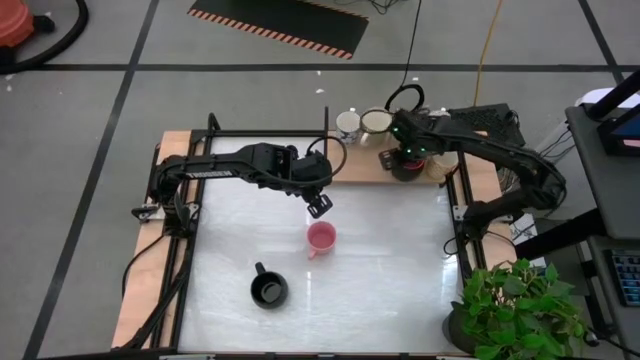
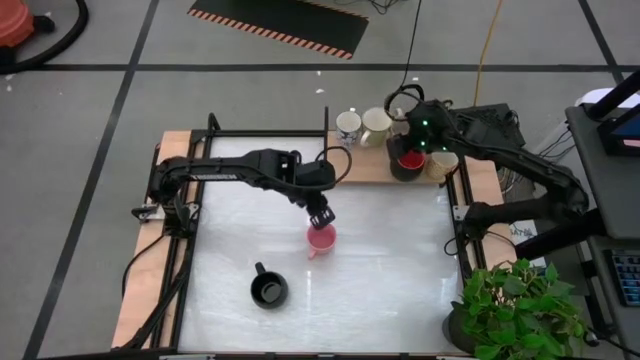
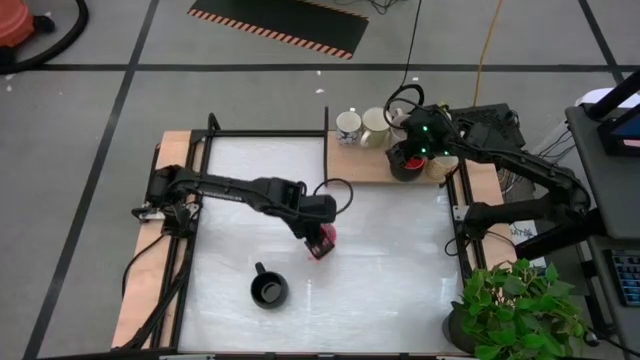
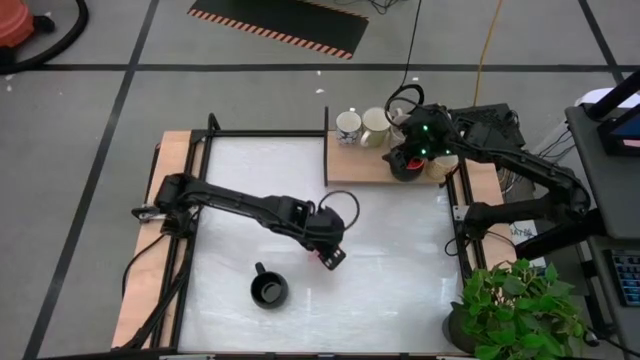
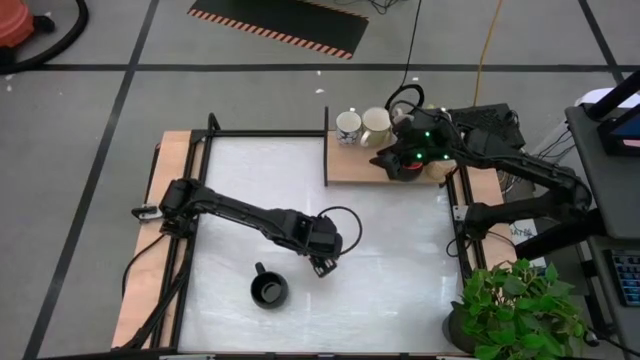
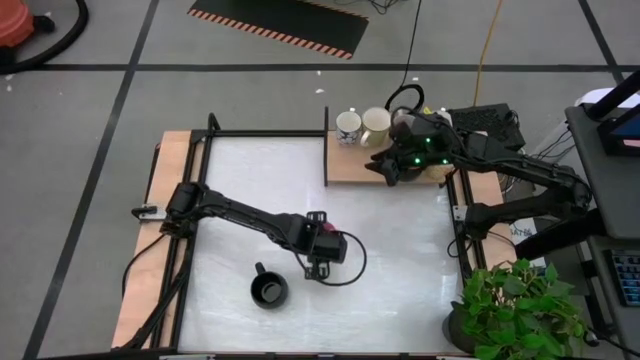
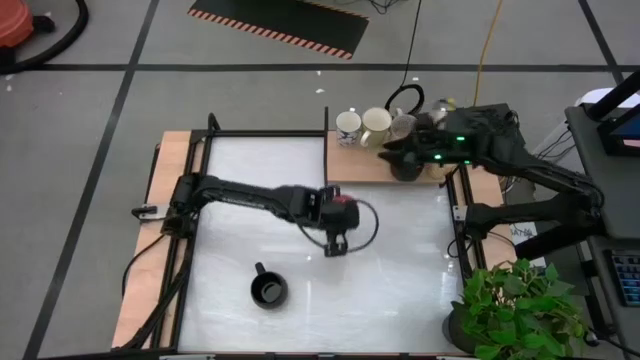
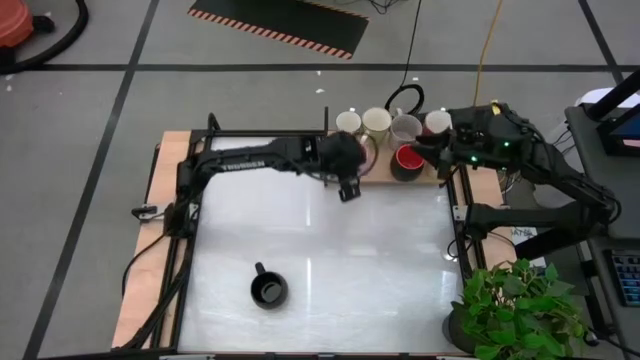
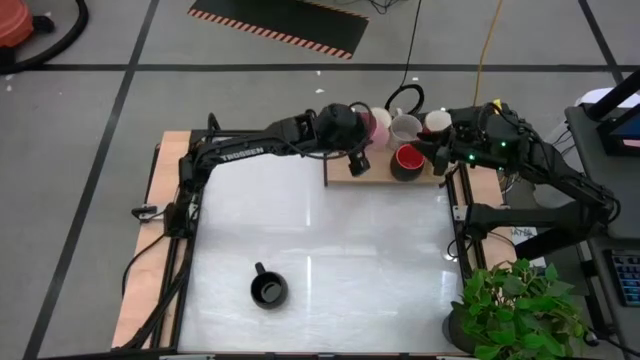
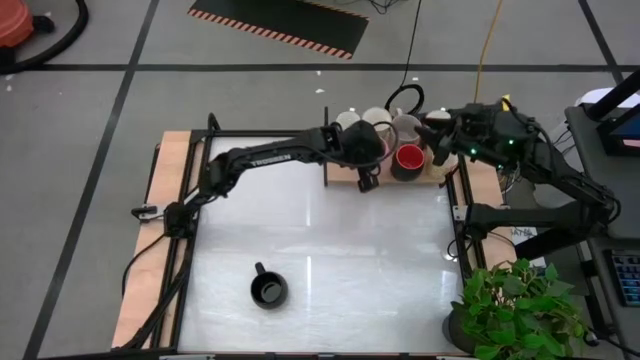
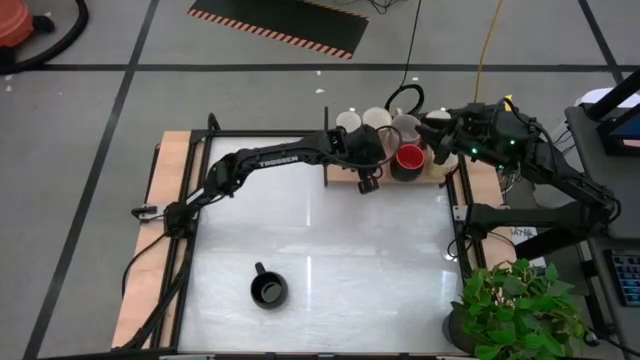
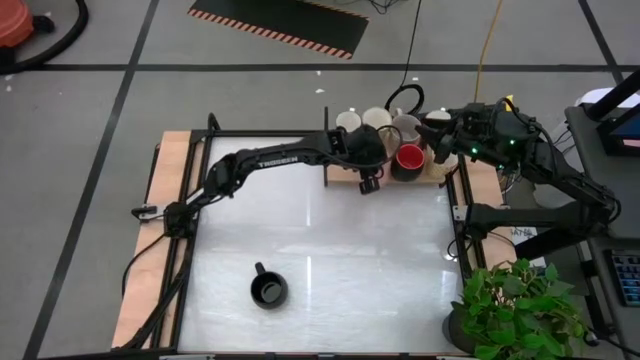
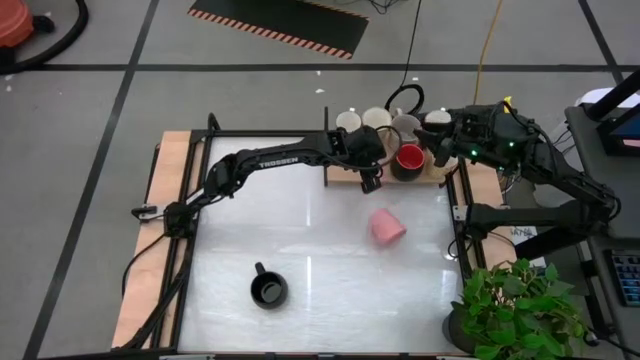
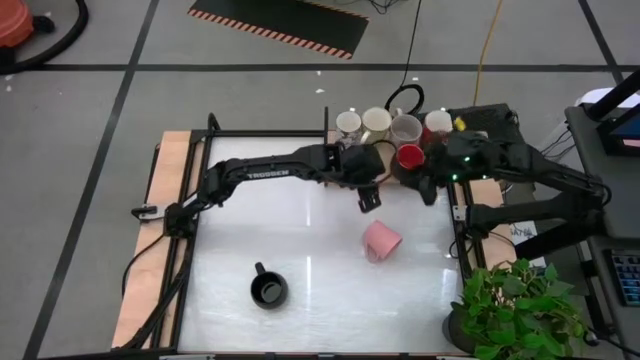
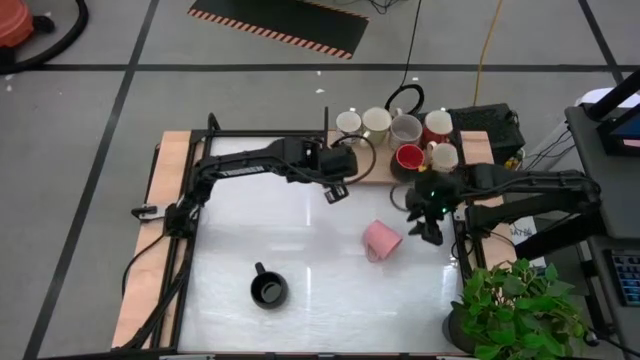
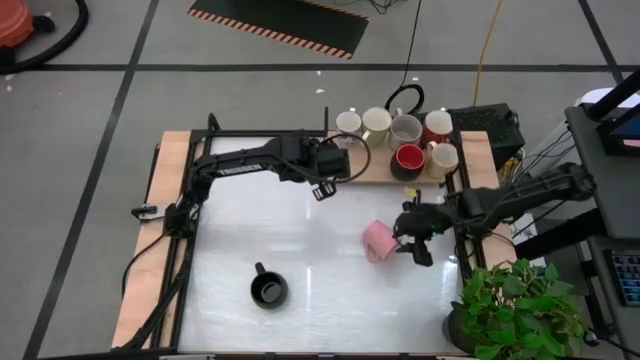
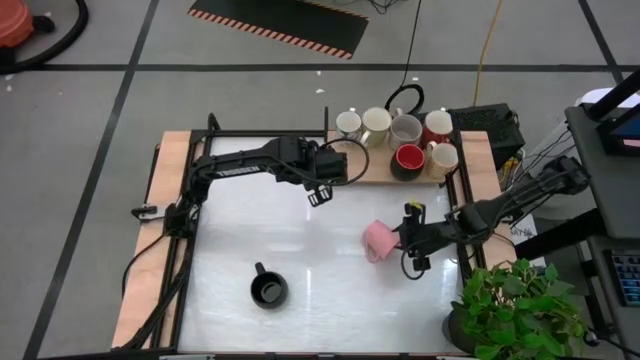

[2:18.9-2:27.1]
Task: Place coffee mugs
Put the pink mug on the shelf

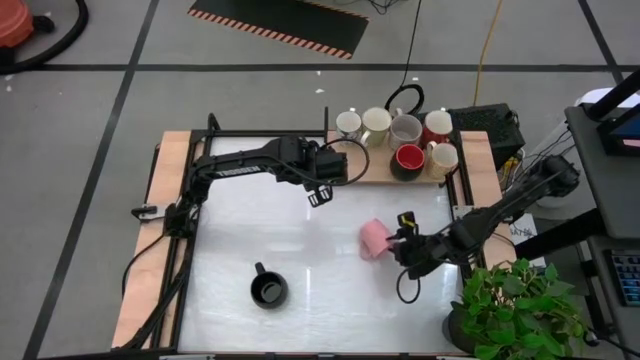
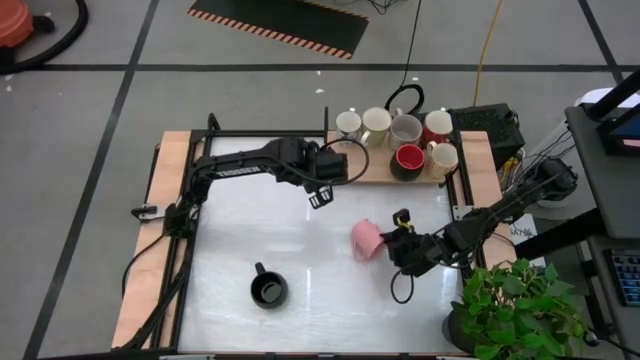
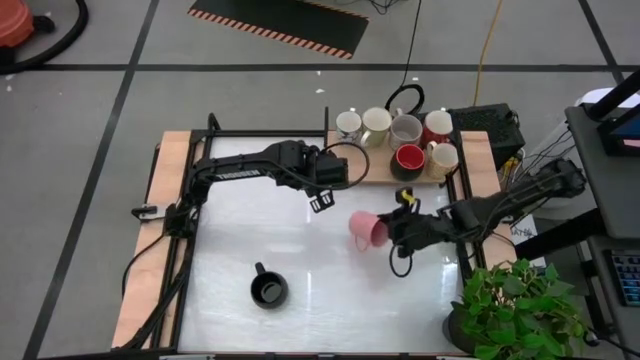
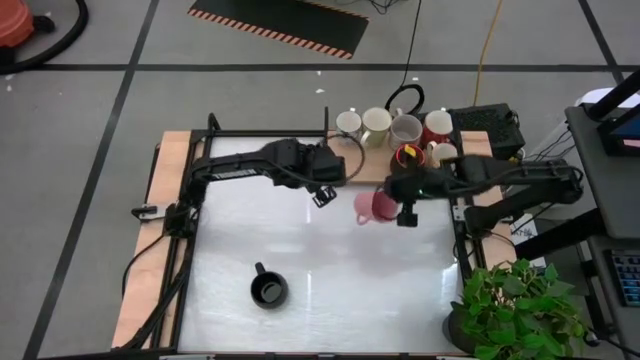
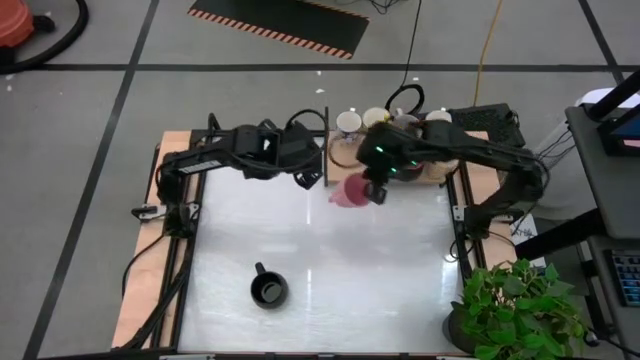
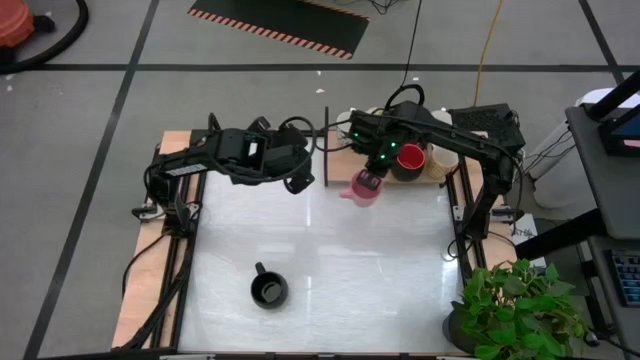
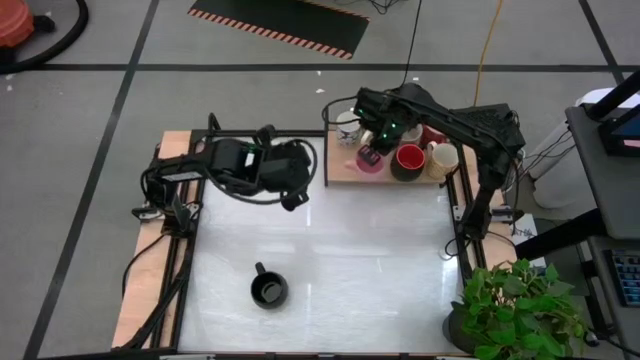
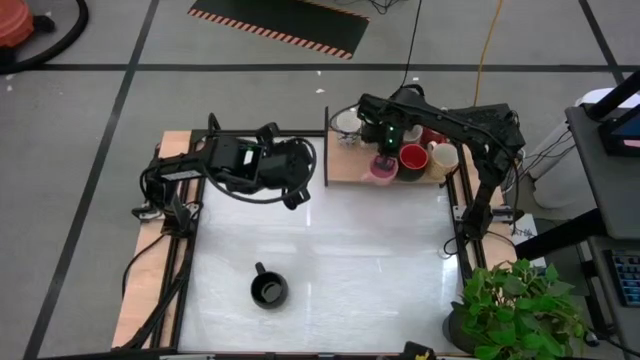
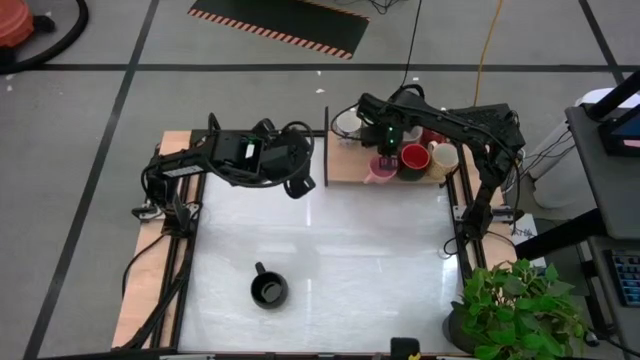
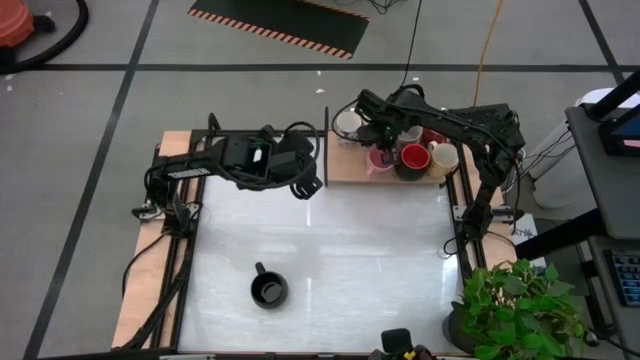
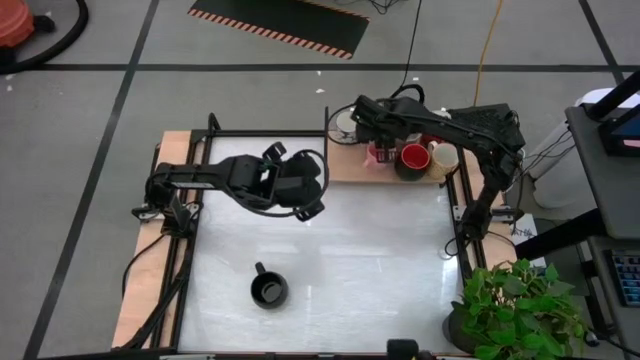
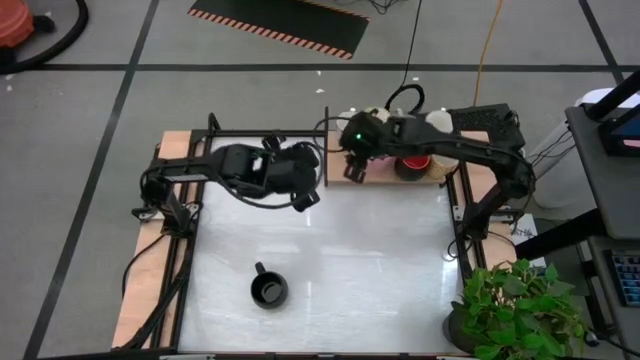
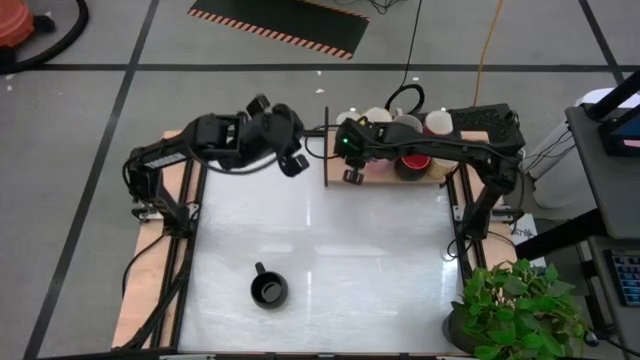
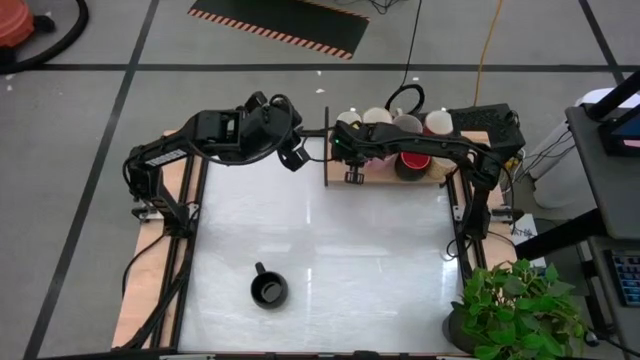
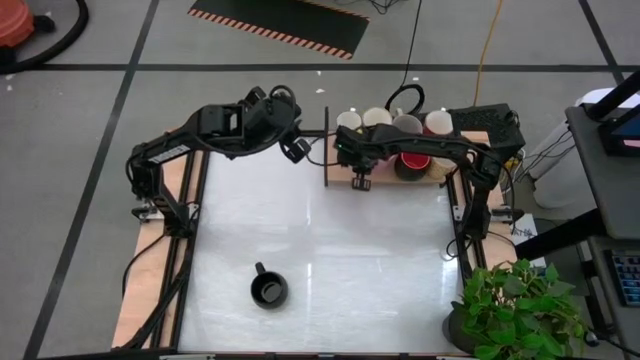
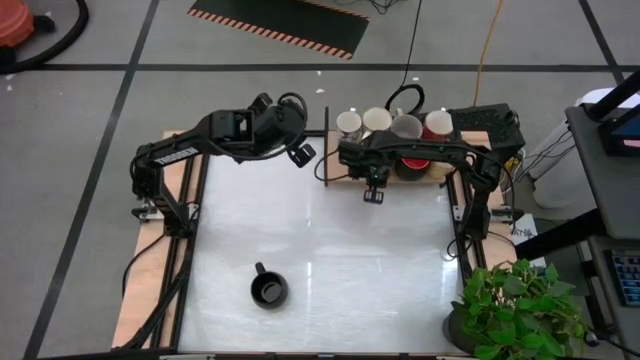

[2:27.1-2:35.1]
Put the pink mug on the shelf

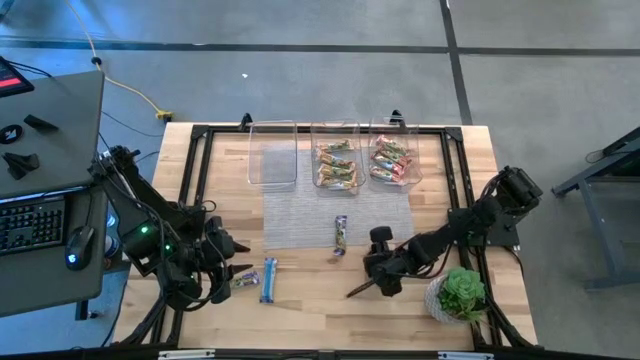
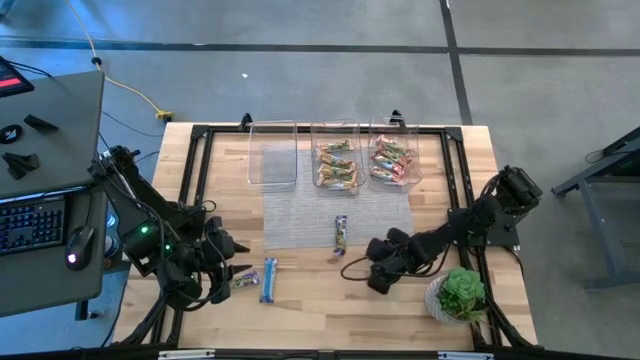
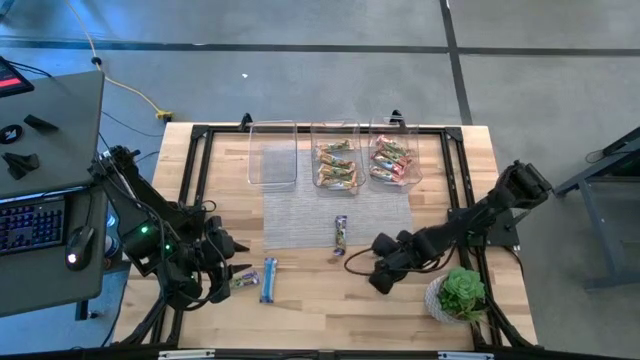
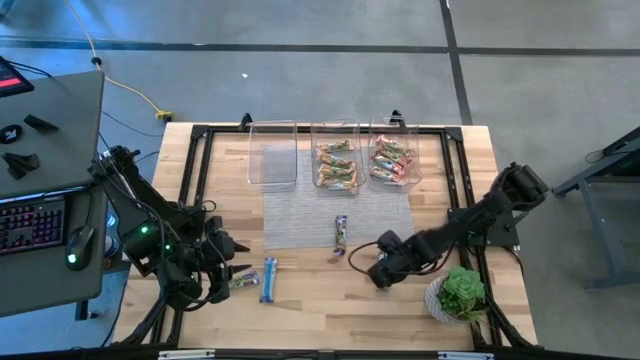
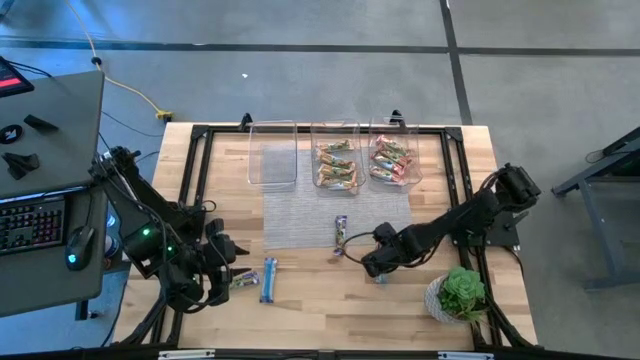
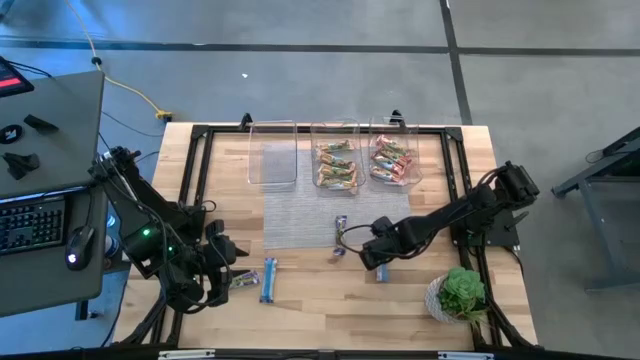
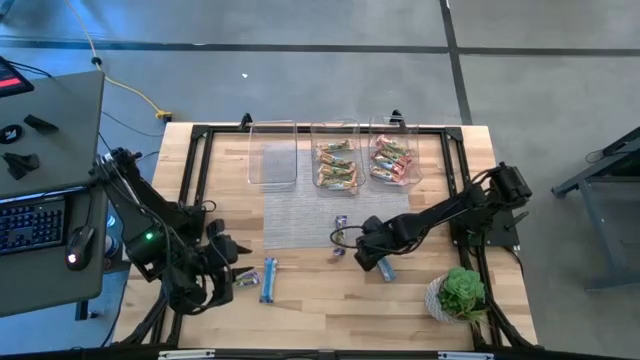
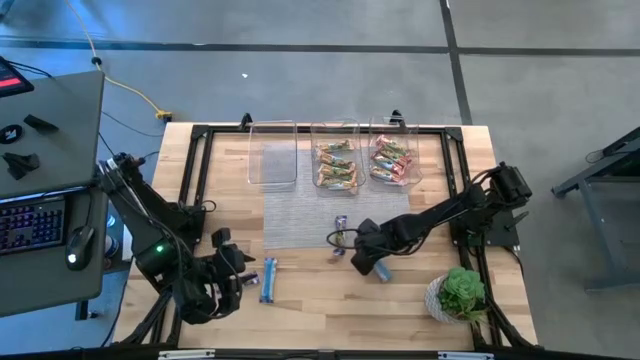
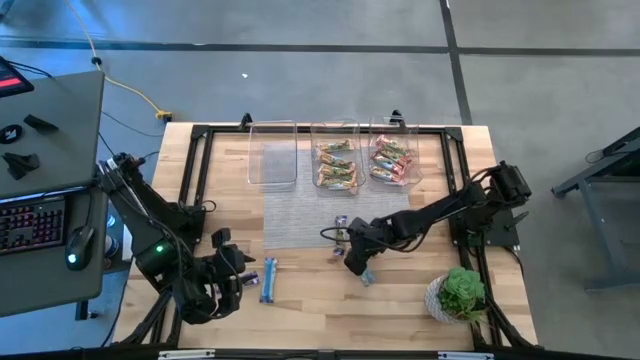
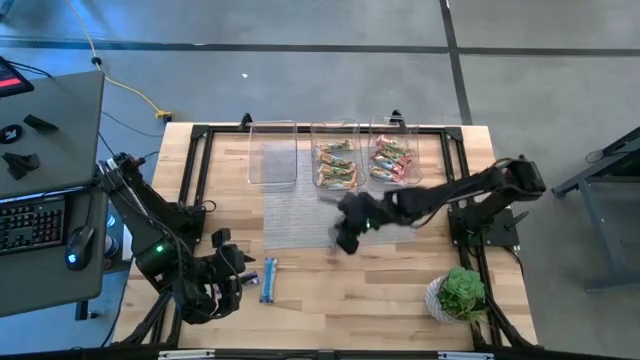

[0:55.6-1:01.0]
Task: Pick and place Granola Bars by type
Put the orange granola bar into the middle transparent bin
